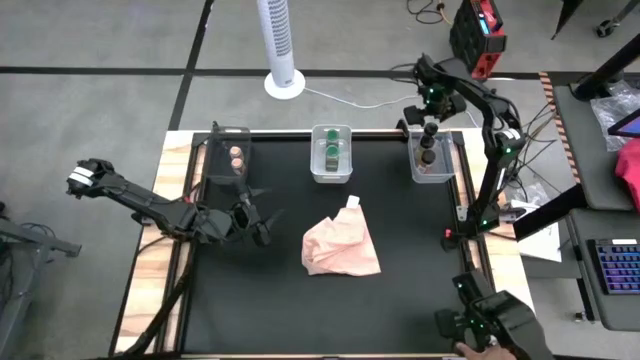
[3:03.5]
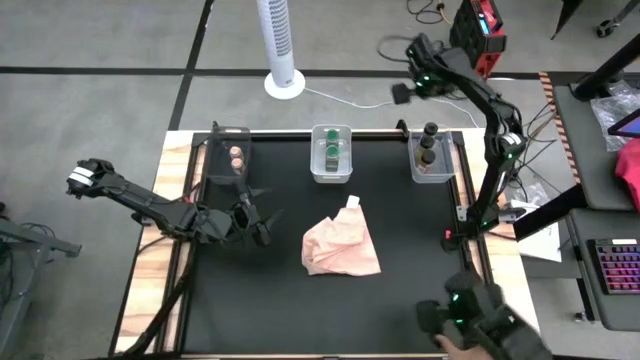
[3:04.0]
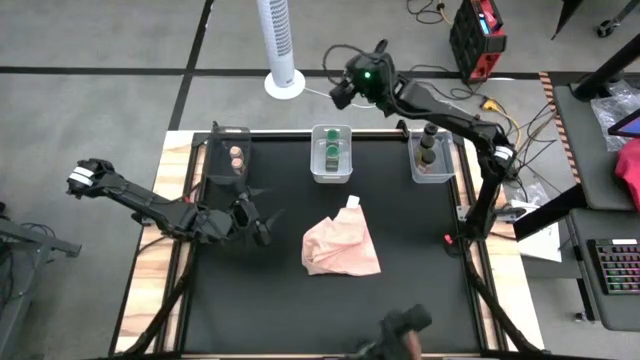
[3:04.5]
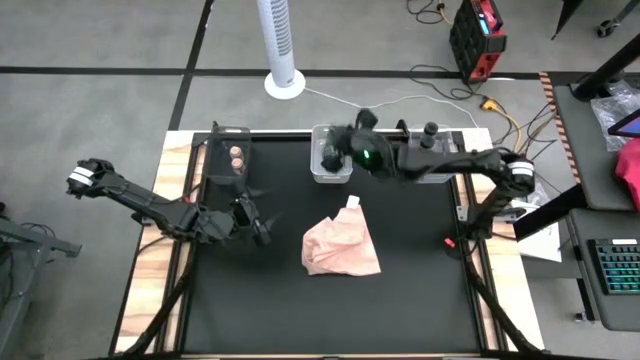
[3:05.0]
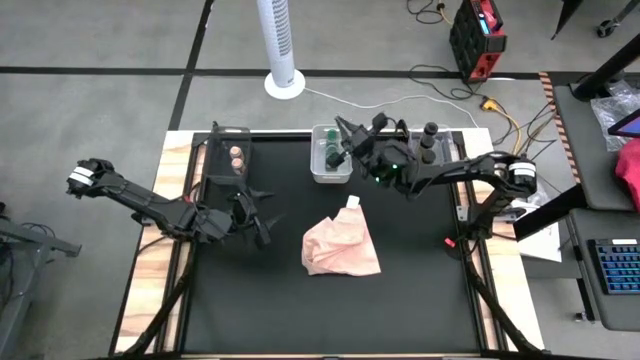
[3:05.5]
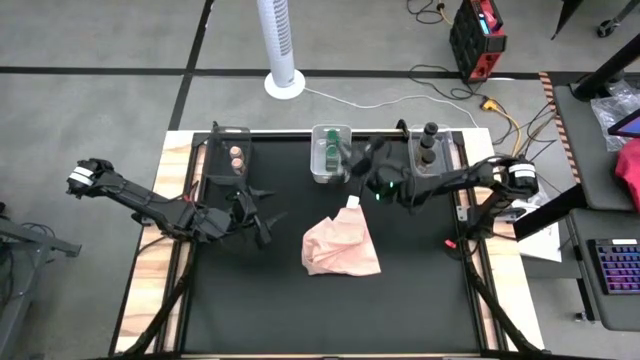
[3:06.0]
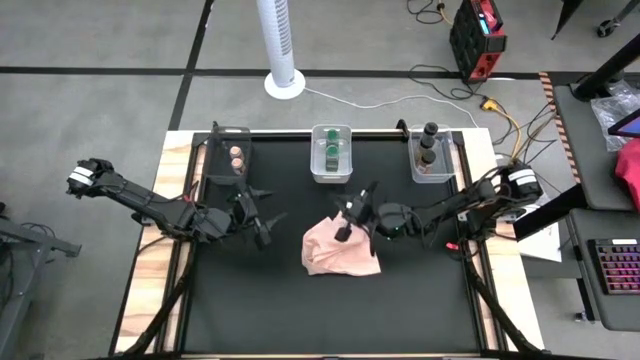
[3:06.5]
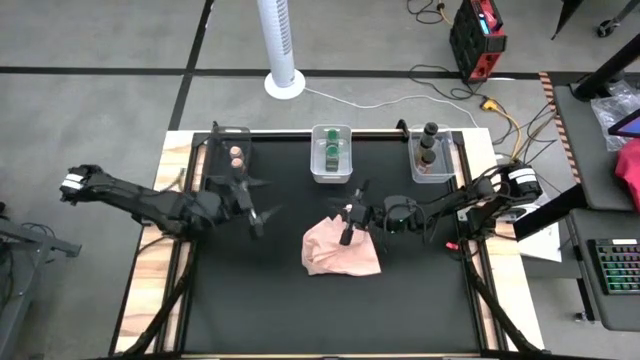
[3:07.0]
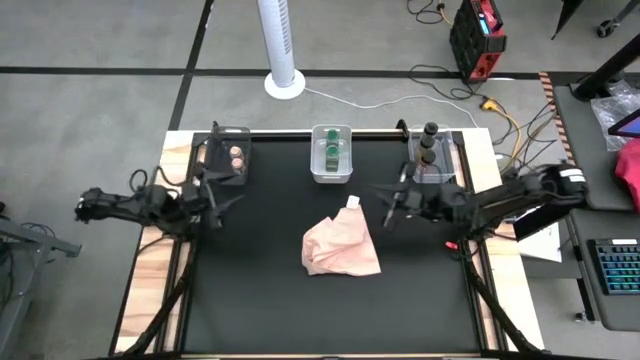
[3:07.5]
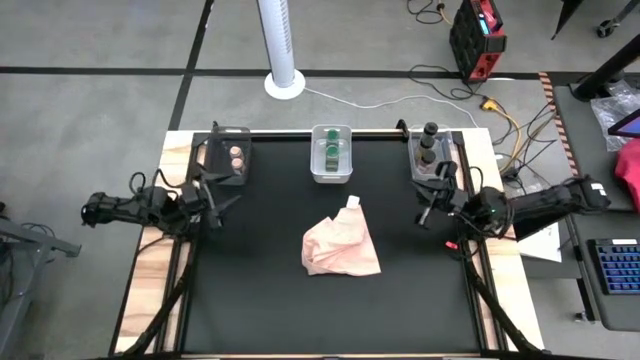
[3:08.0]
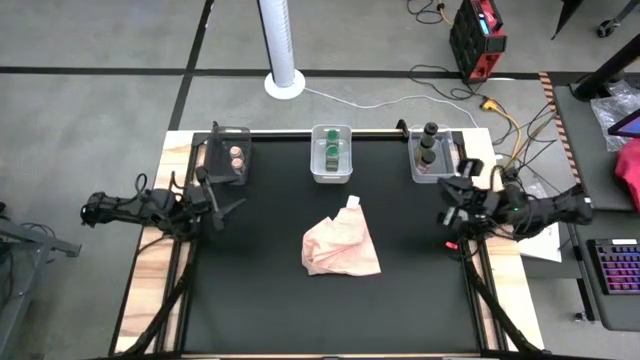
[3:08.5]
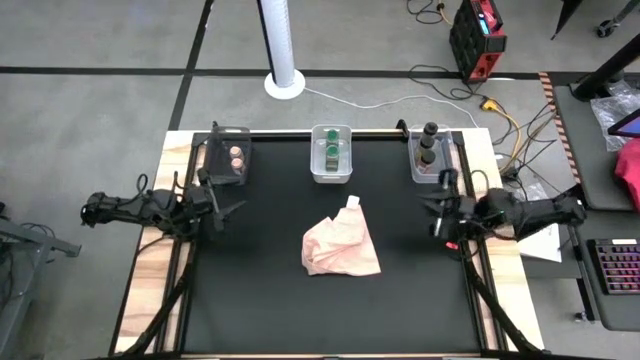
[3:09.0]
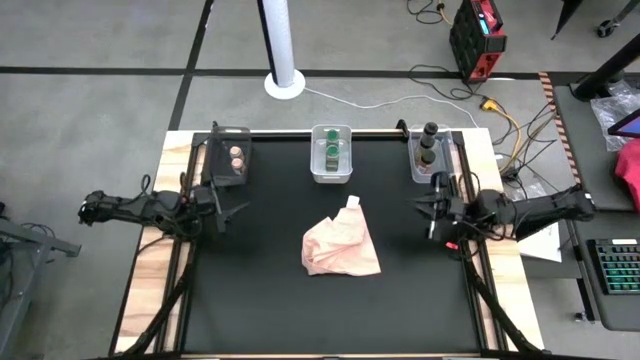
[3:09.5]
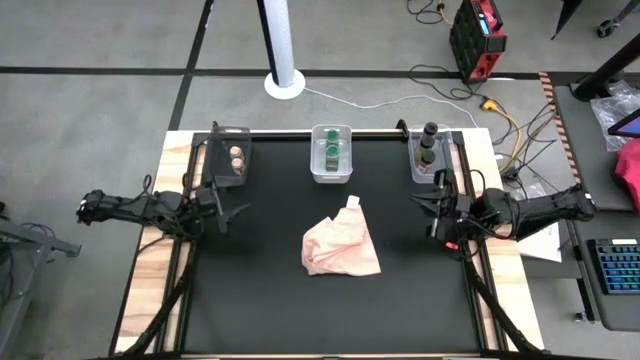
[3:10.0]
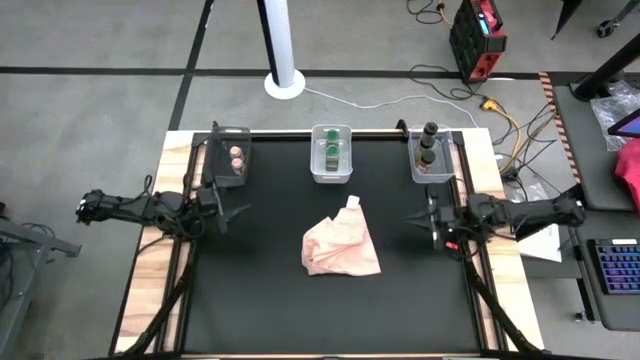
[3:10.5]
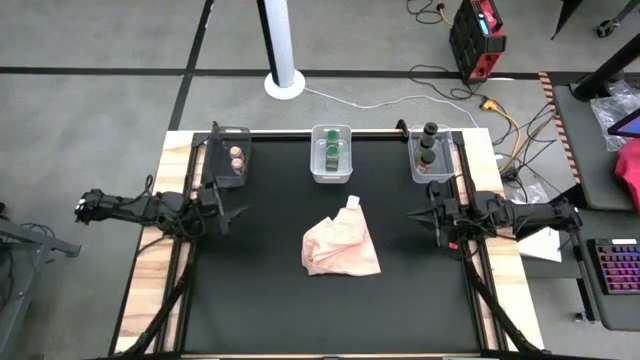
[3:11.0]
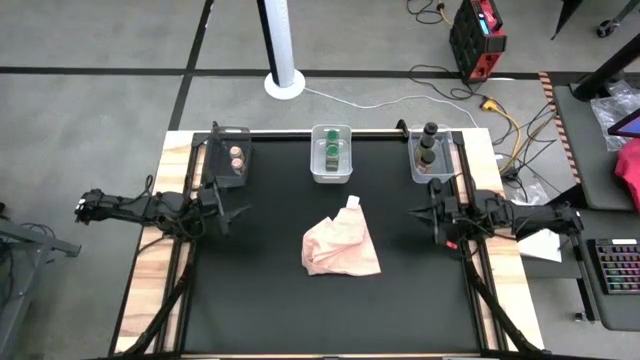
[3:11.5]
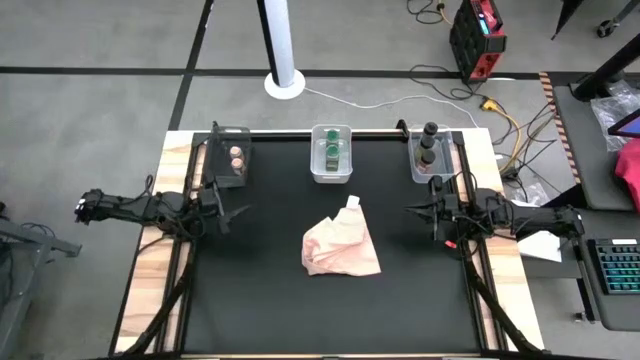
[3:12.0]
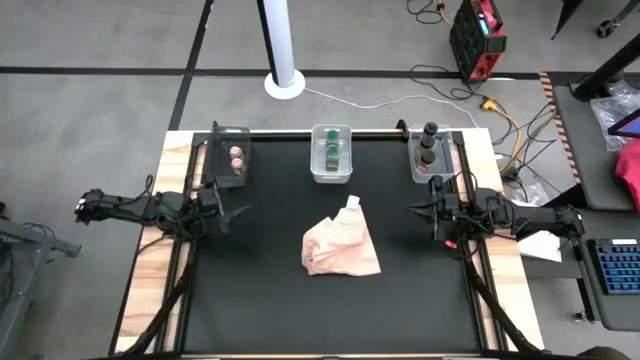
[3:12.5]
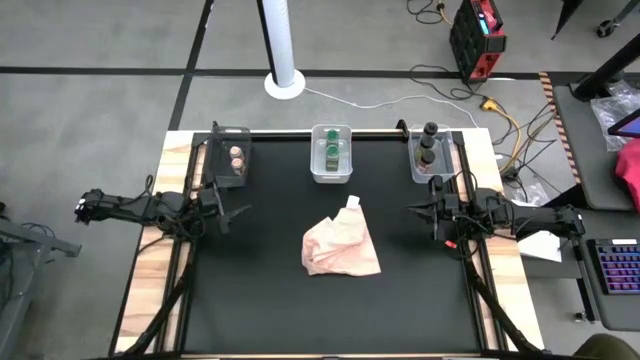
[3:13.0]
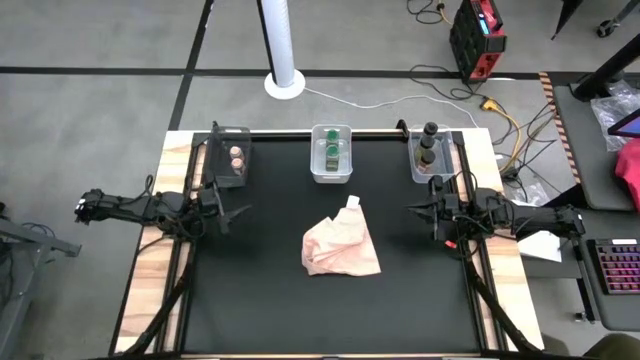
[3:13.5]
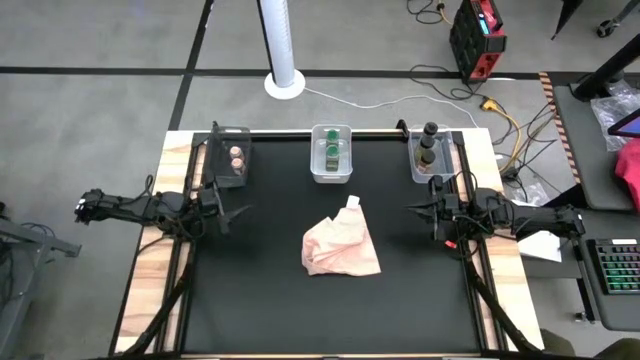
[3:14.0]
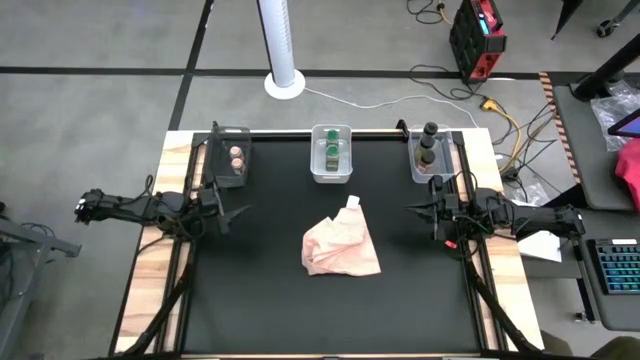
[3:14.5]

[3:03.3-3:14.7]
Task: Sort spices by type
Return to Home Position

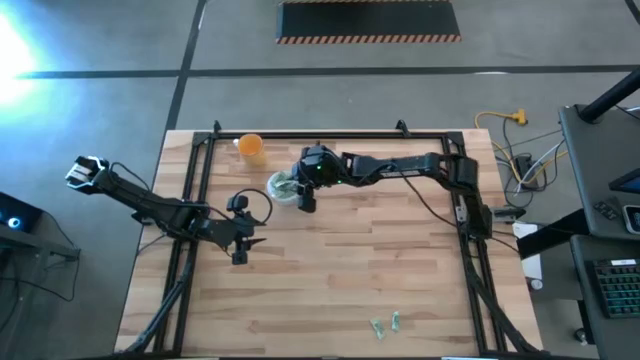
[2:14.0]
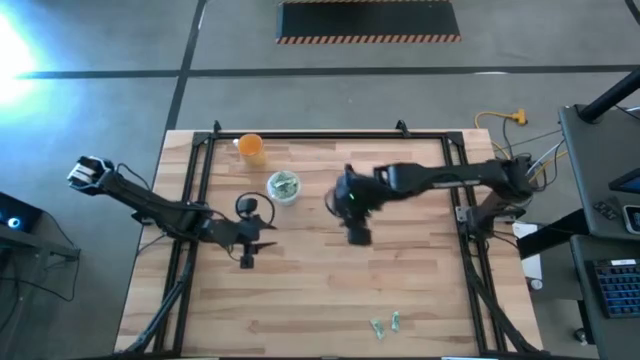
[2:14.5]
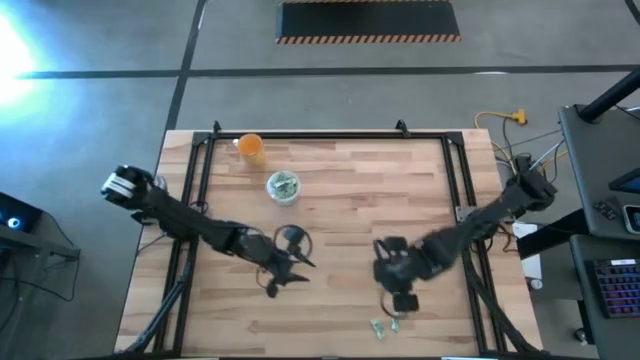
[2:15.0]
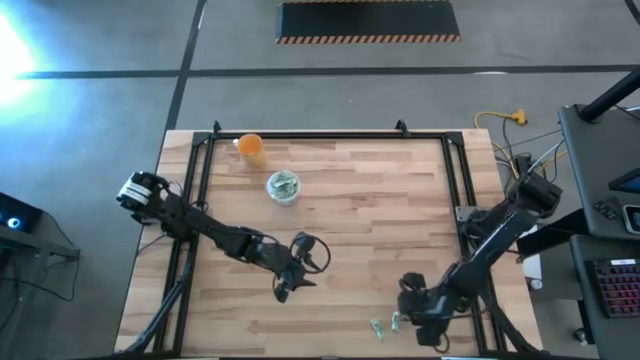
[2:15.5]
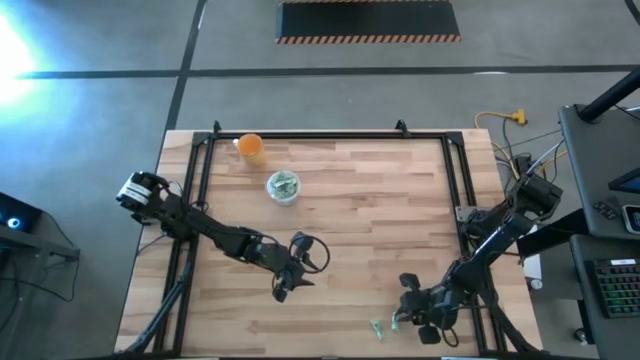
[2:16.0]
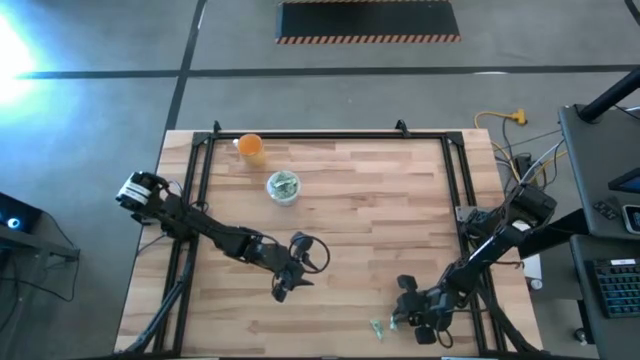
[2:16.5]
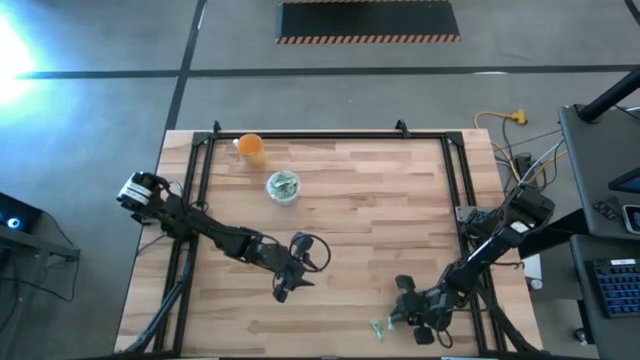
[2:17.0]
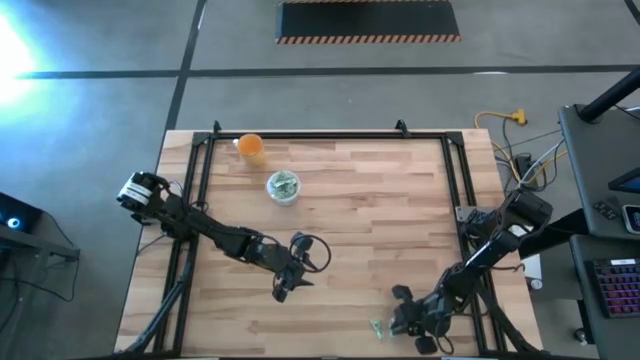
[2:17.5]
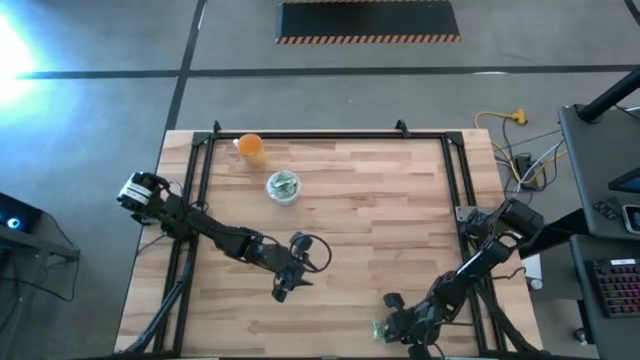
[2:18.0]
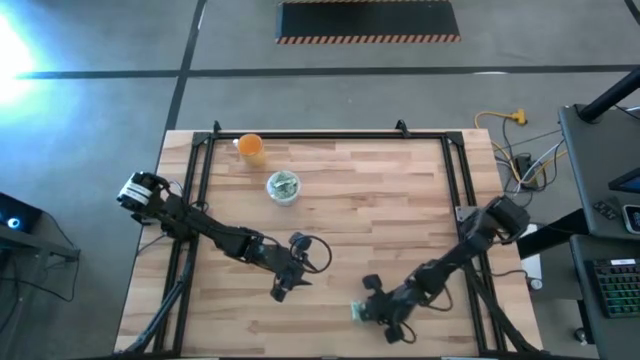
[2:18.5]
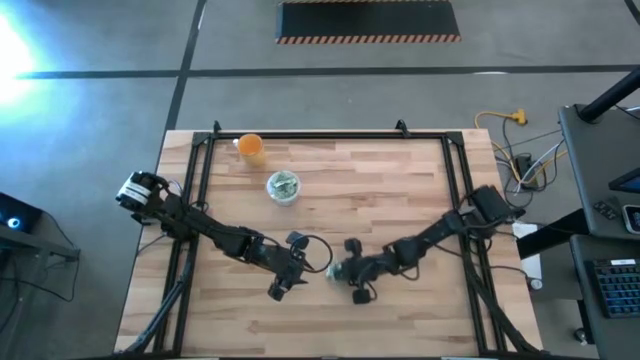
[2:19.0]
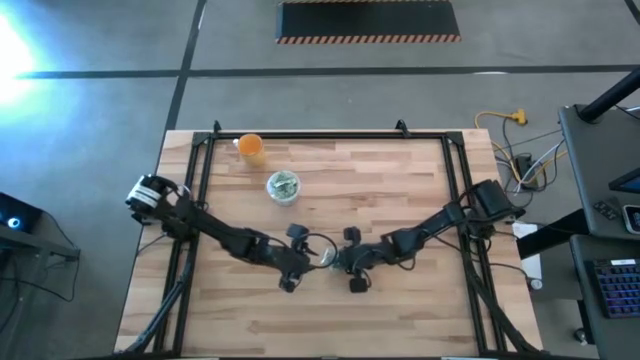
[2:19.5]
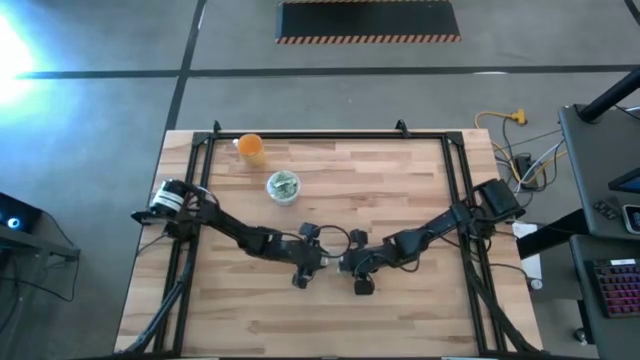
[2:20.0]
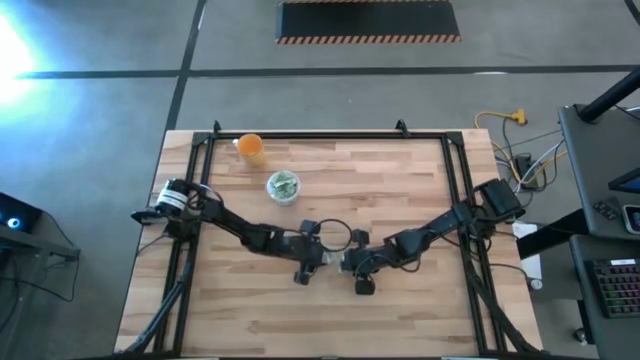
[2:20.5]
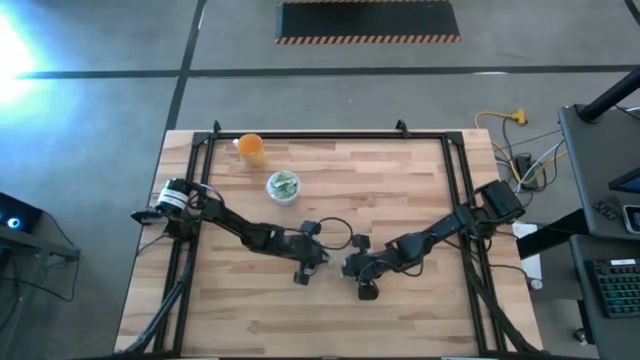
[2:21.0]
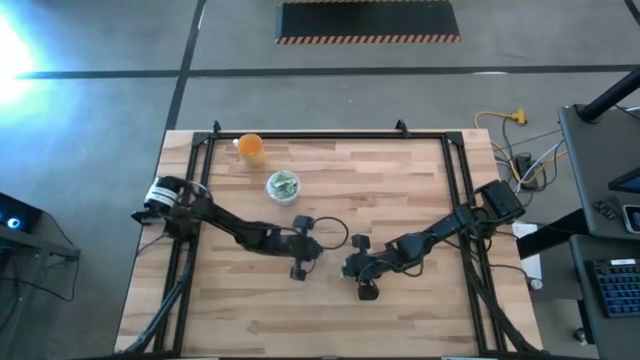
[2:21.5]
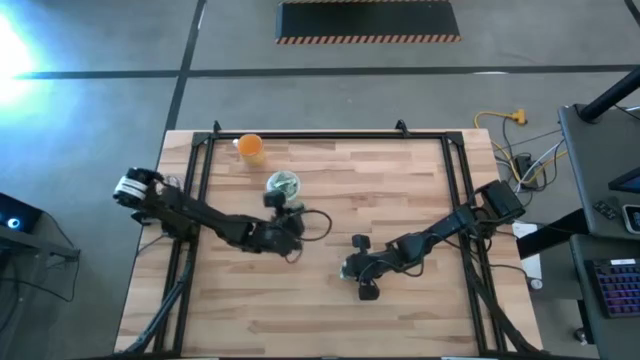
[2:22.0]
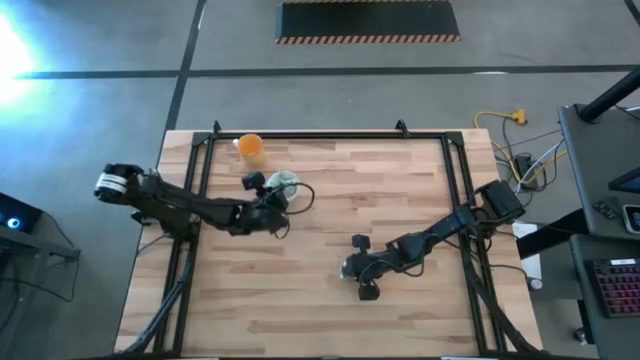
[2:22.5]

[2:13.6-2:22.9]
Task: Pick and place Stevia / Truvia into bins
Put the stevia packet into the transparent container
